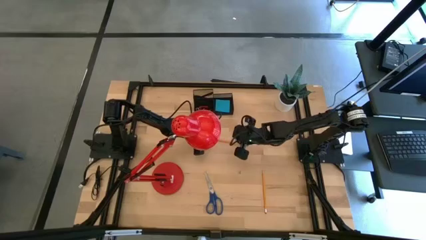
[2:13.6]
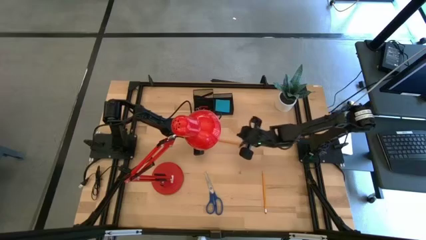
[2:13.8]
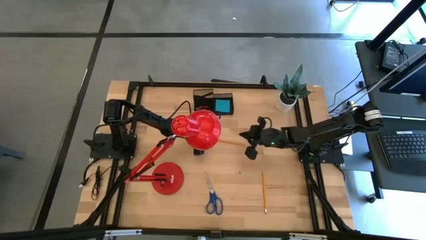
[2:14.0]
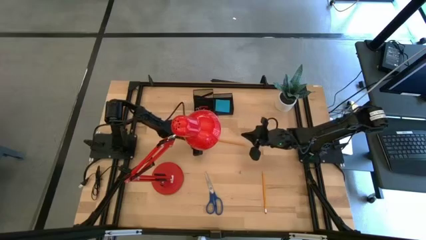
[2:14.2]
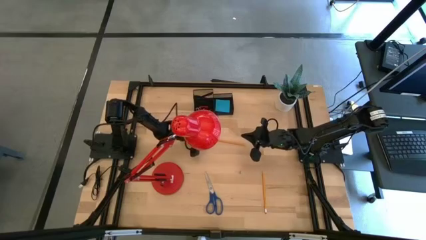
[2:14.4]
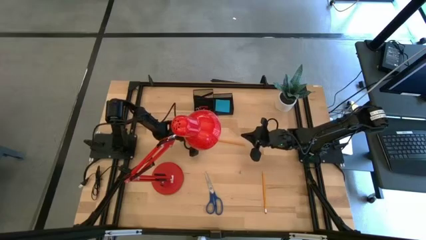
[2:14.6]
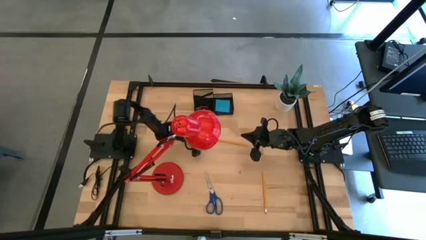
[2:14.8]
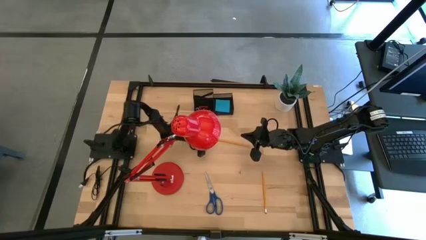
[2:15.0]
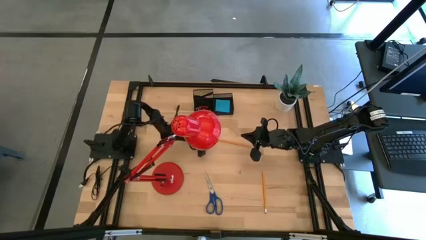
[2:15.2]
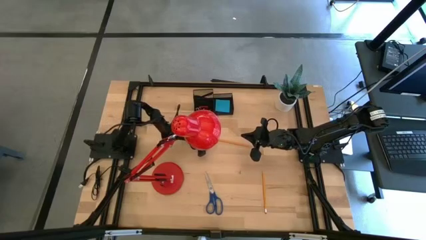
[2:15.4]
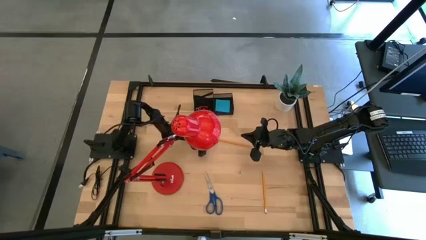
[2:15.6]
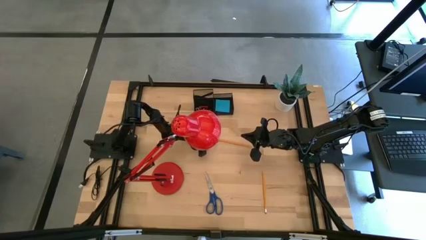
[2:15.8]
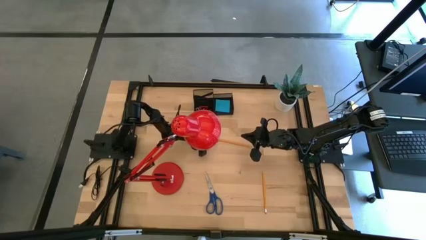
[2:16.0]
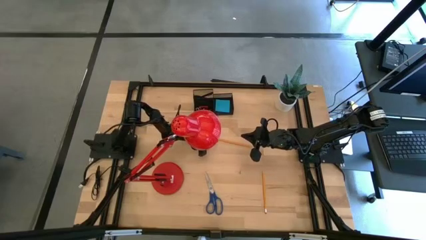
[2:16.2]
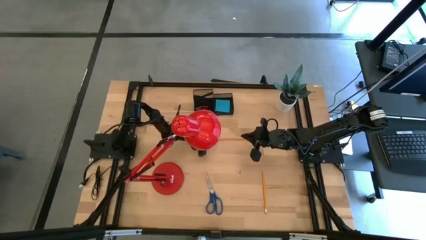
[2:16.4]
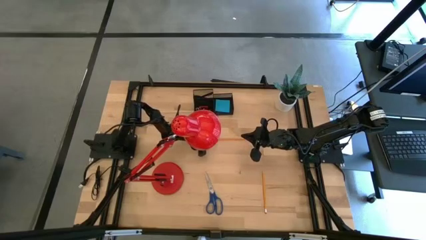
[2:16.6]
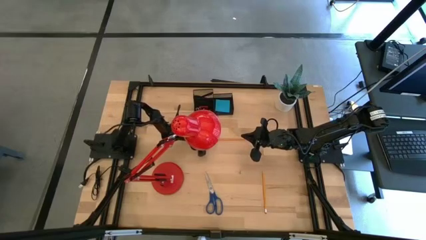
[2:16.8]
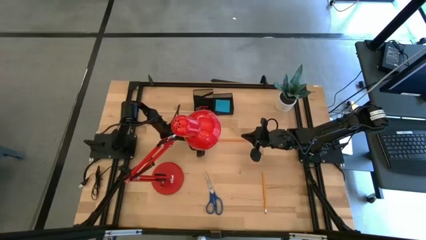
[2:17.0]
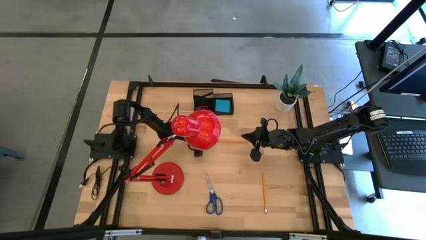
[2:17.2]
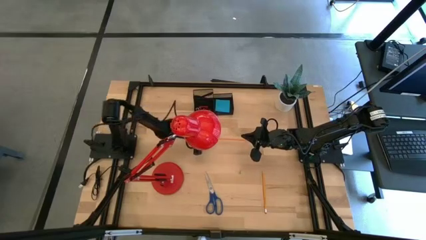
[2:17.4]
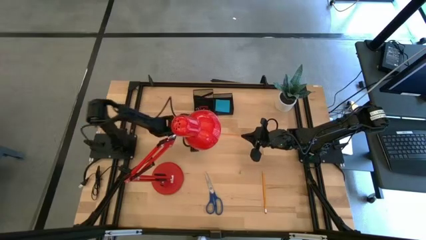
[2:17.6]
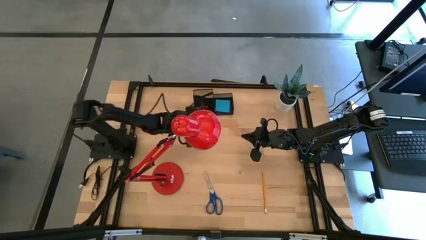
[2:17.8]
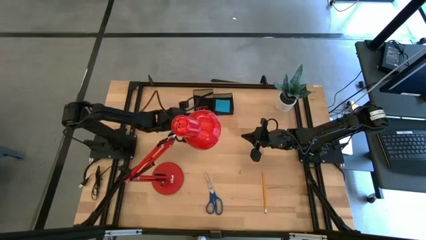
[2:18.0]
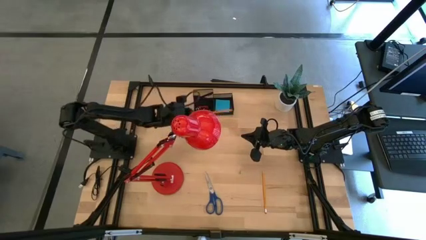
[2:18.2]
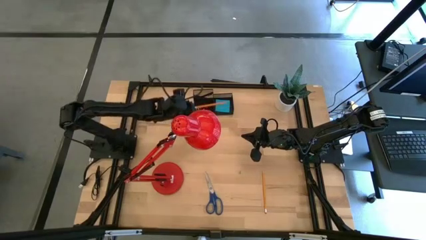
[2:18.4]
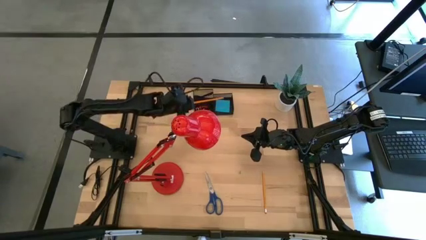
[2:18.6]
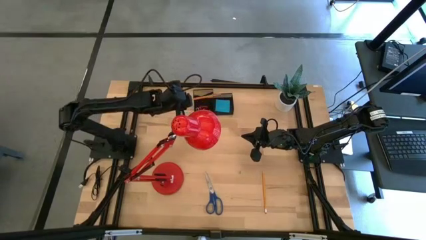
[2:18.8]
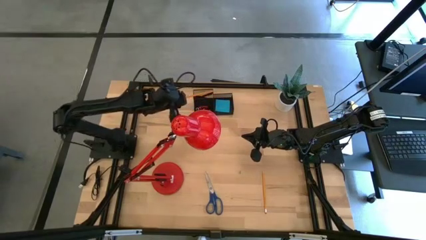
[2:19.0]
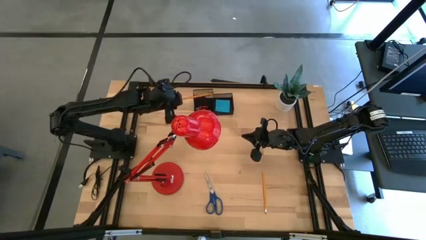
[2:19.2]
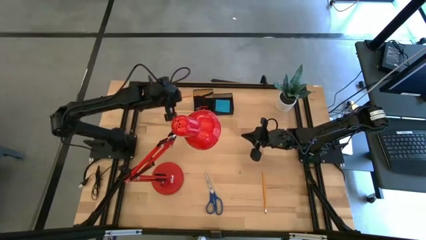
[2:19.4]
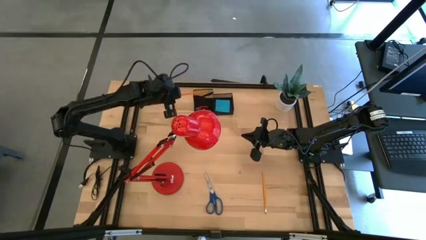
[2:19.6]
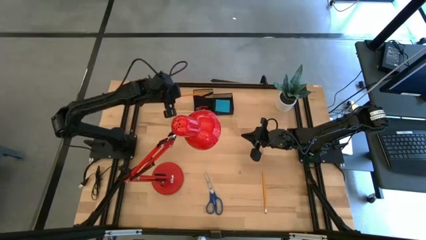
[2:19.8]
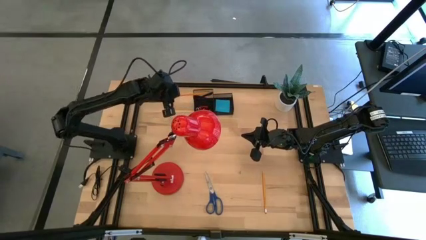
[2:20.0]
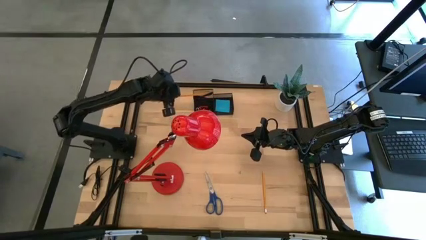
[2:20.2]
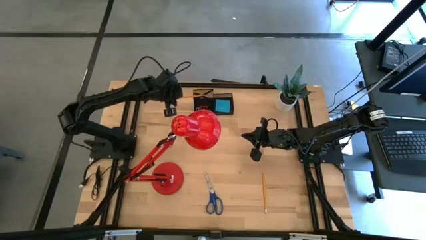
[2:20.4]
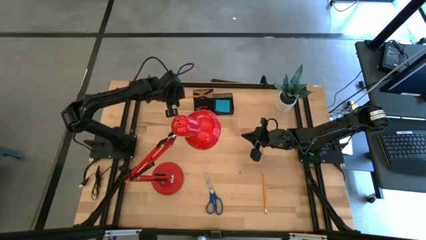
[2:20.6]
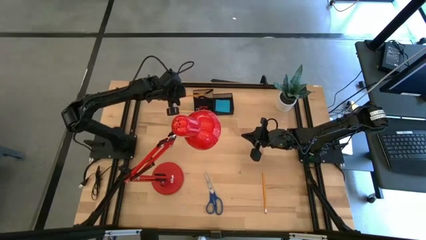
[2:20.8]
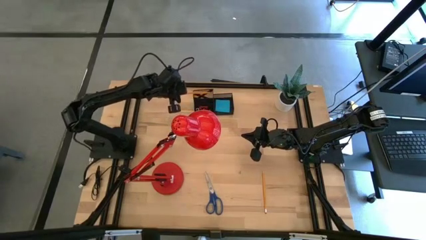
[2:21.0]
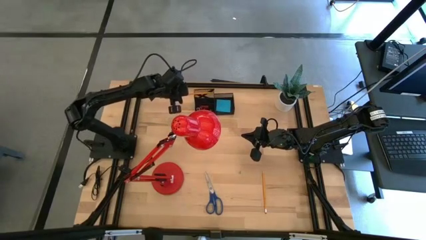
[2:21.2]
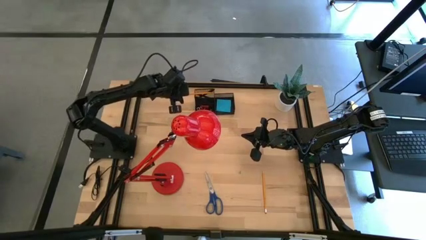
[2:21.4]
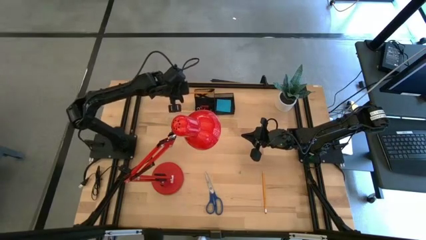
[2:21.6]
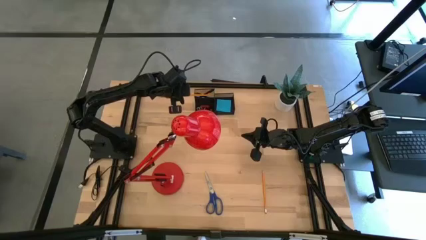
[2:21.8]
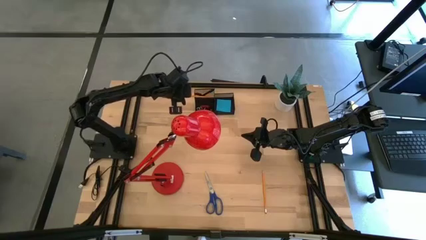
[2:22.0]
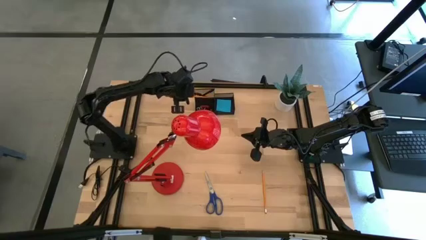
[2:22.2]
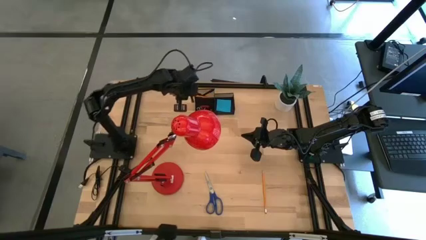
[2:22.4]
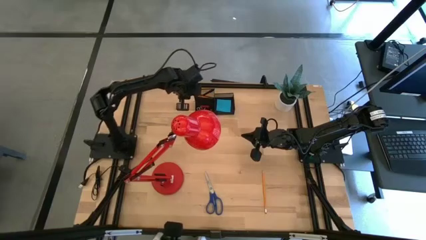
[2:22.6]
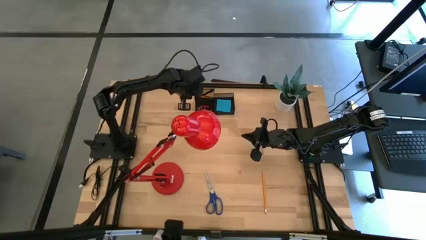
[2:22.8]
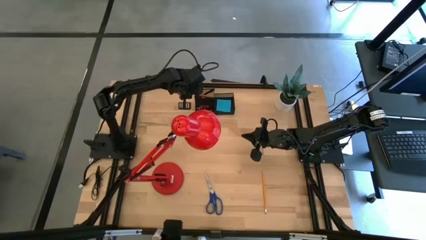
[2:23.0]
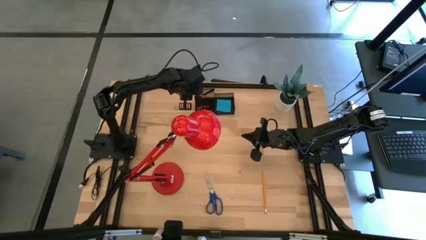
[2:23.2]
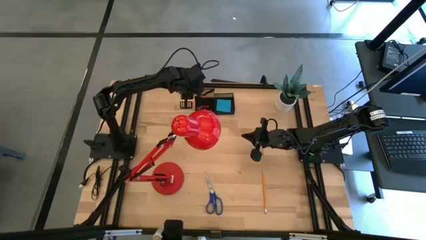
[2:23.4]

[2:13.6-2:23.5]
Task: Pick and place office supplies into organizer
Put the top pencil into the desk organizer
